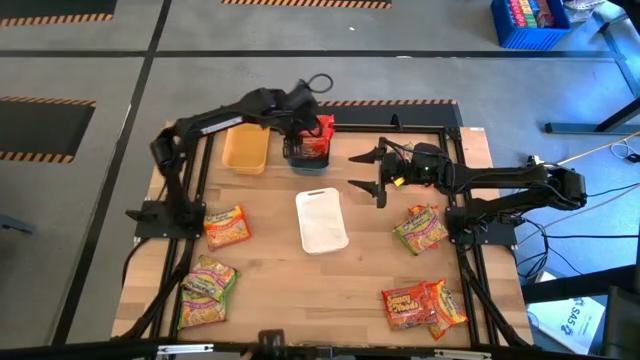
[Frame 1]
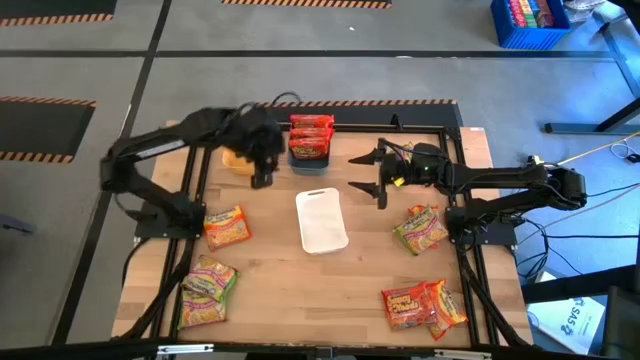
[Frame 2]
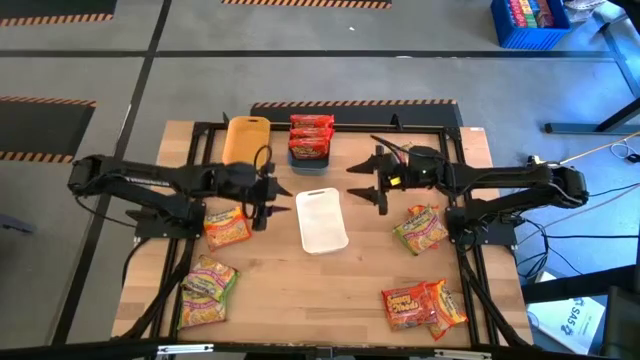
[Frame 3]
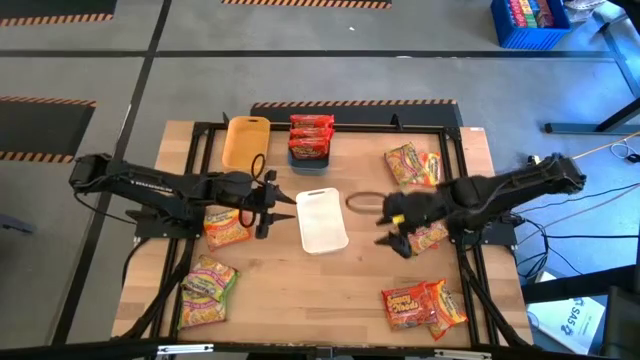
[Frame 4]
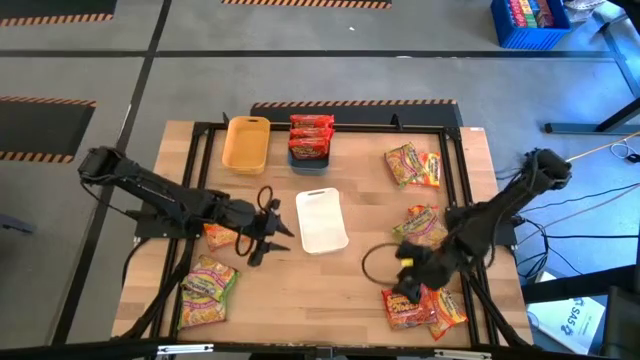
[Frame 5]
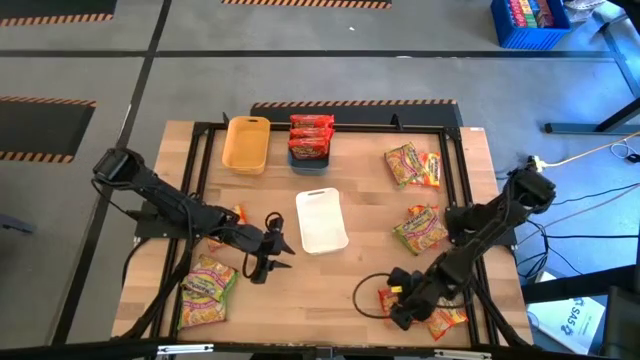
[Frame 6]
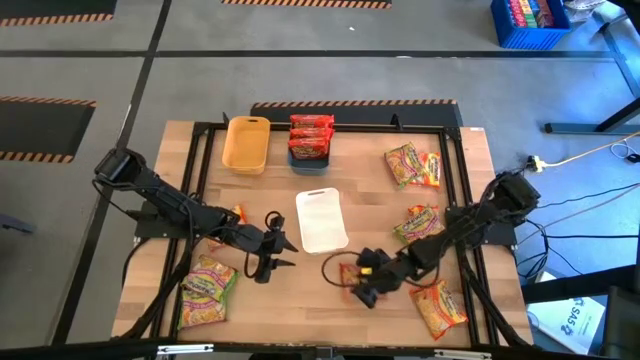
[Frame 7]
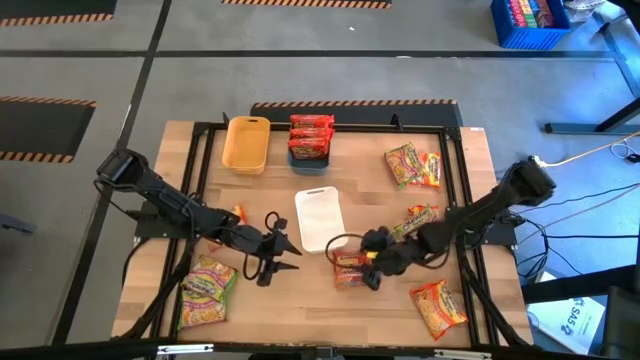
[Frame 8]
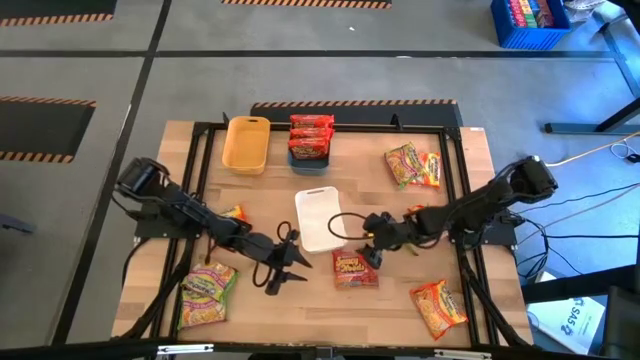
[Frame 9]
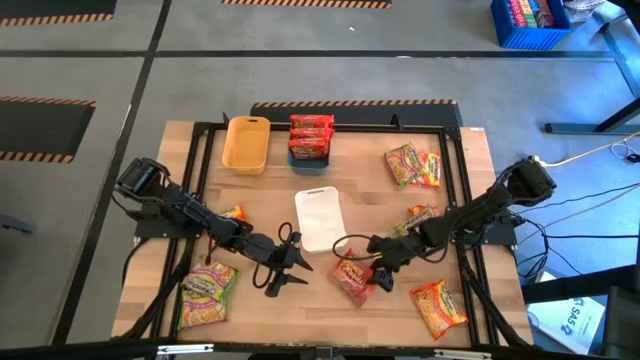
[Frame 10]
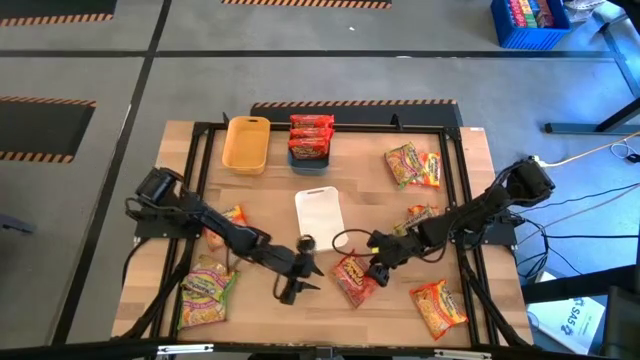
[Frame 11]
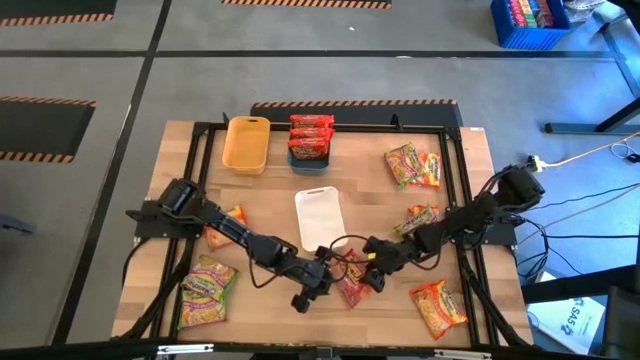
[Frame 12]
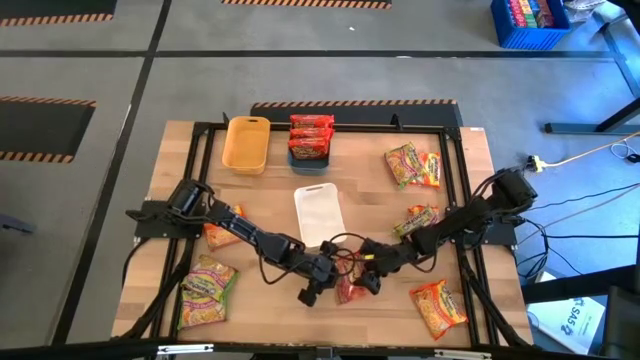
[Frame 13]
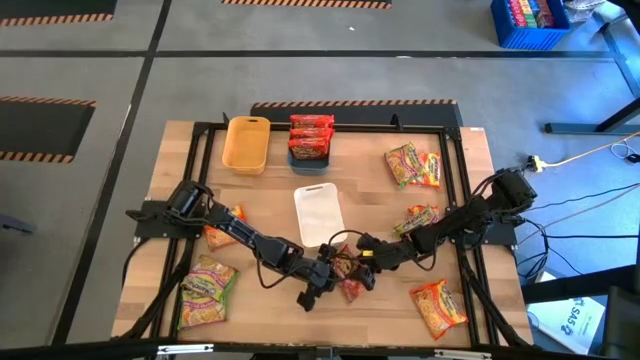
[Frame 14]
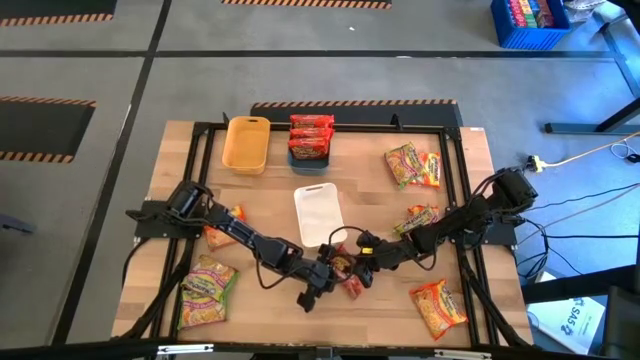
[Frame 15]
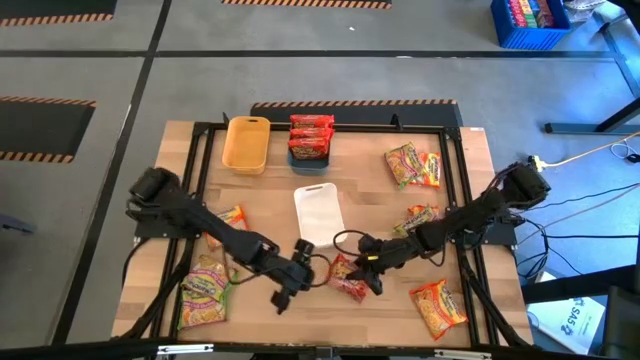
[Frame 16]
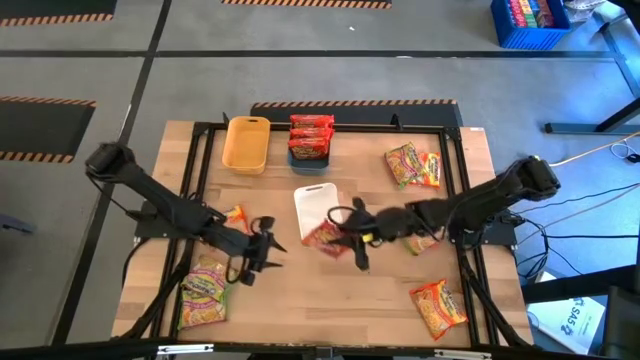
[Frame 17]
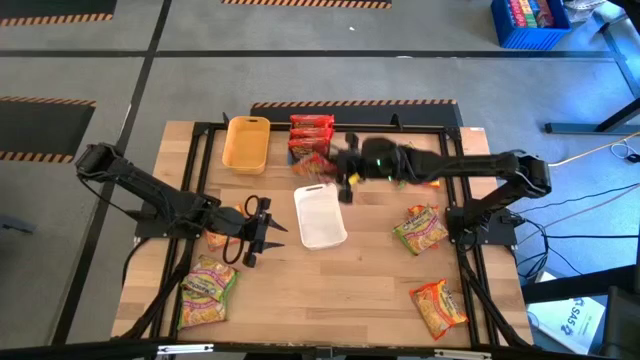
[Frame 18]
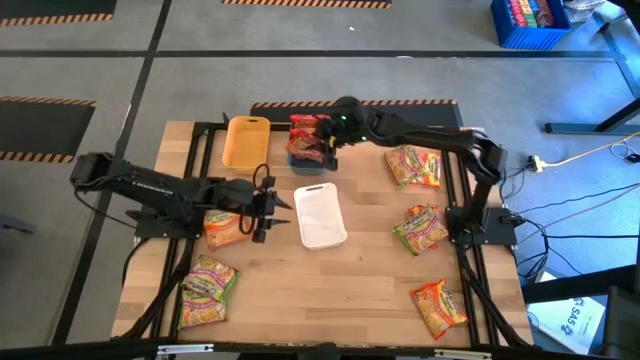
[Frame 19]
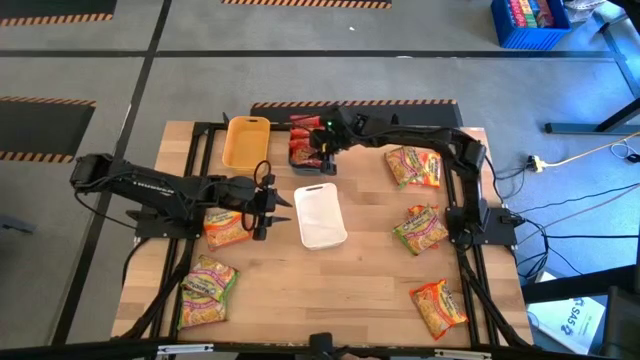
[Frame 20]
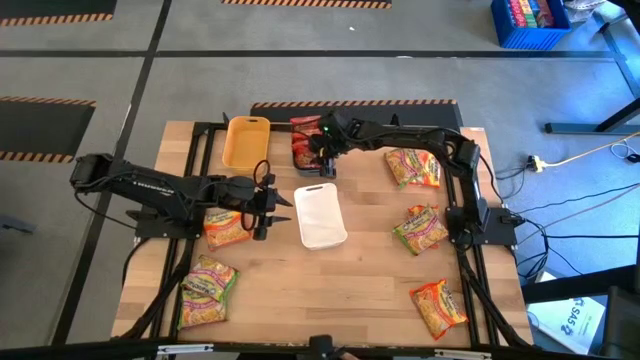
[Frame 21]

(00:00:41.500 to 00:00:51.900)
Task: Sort Maruchan noodles
Put the red noodle pack into the blue bin

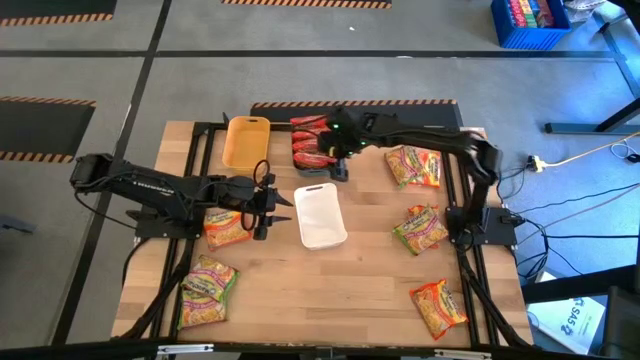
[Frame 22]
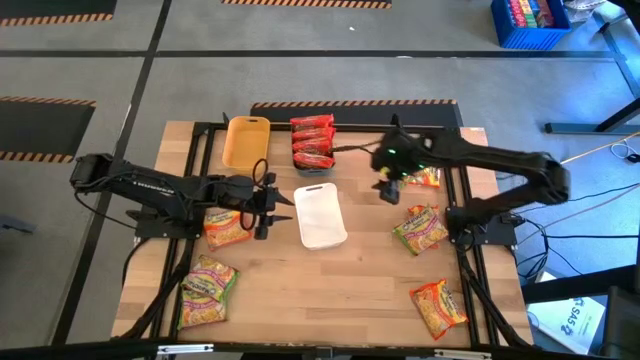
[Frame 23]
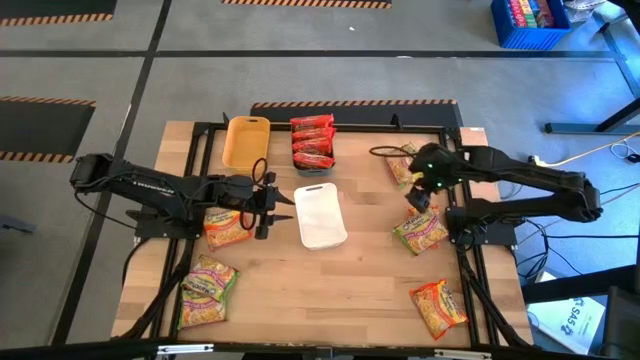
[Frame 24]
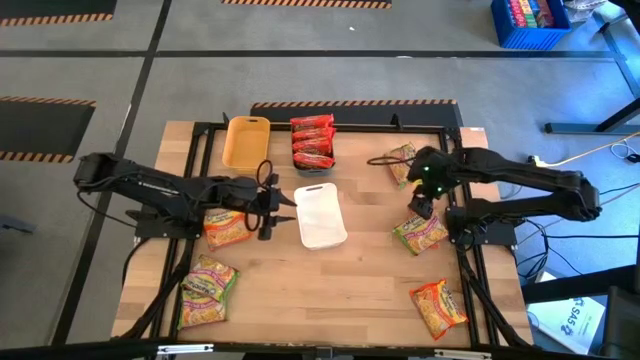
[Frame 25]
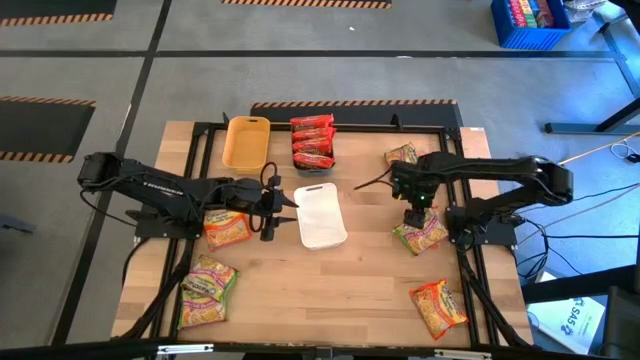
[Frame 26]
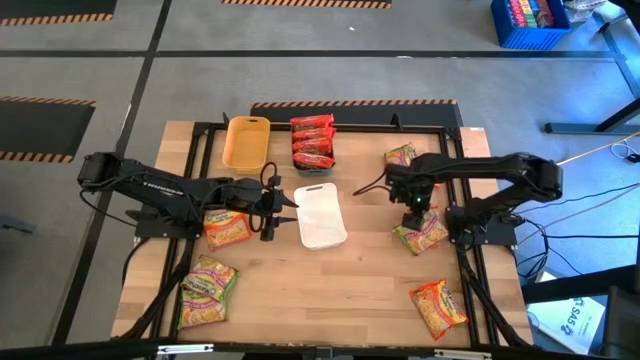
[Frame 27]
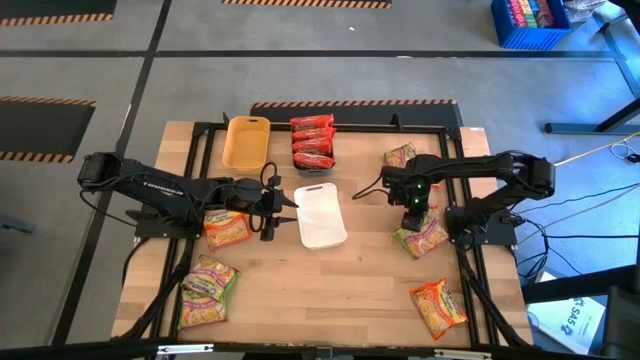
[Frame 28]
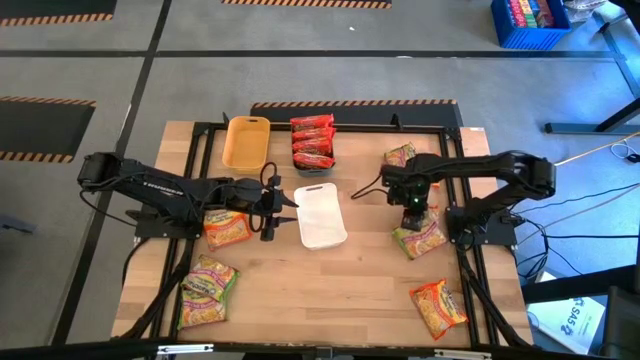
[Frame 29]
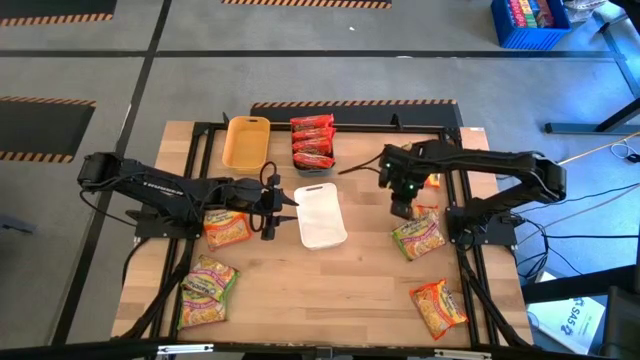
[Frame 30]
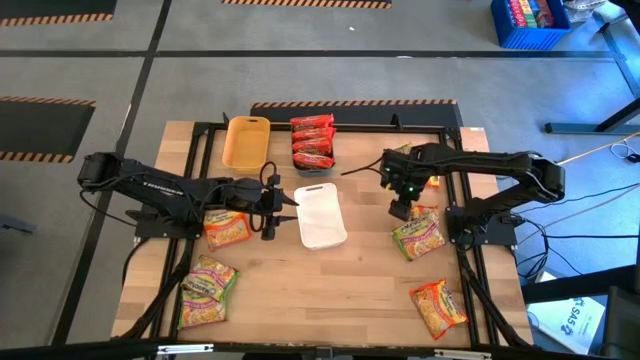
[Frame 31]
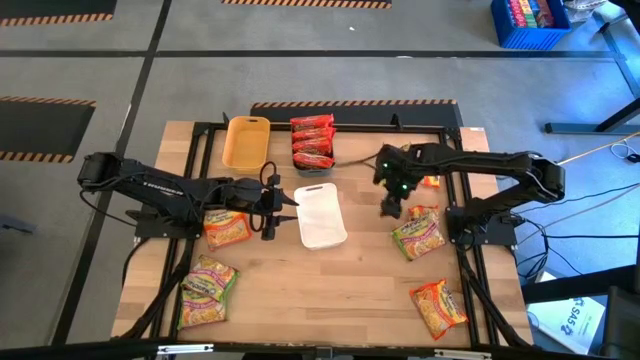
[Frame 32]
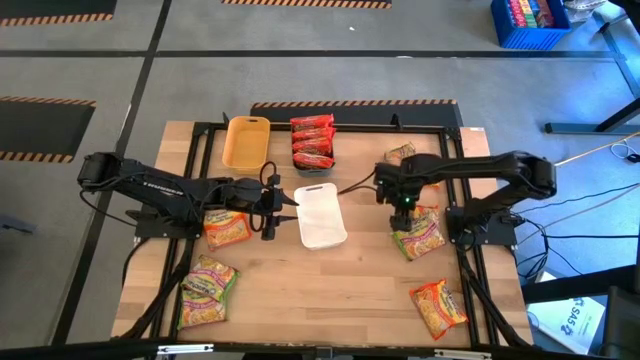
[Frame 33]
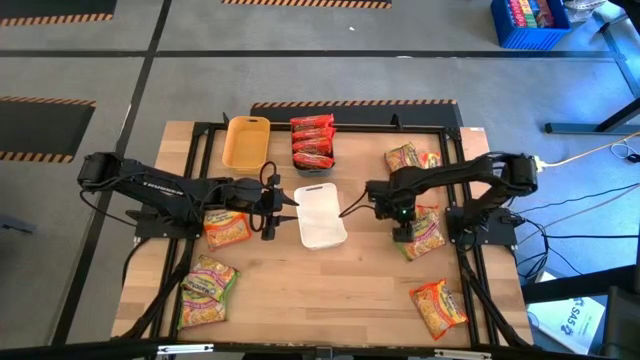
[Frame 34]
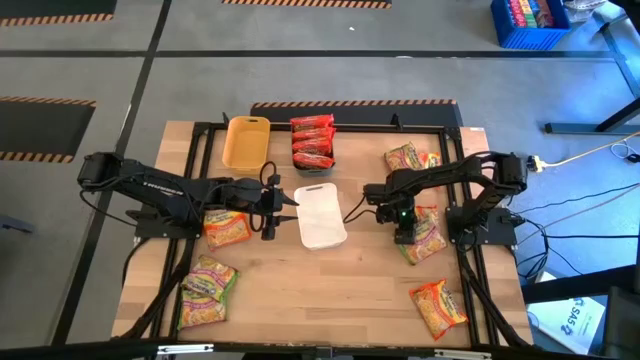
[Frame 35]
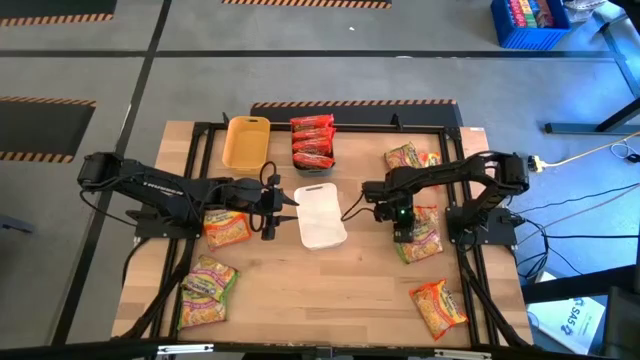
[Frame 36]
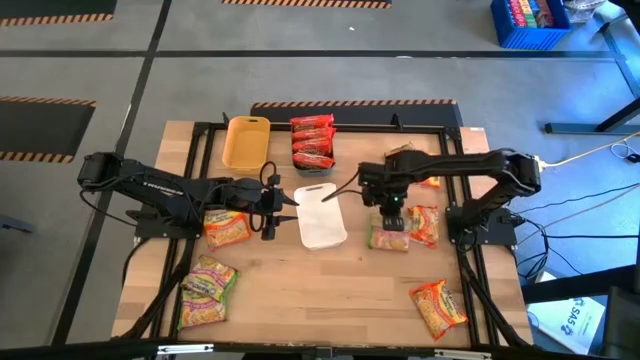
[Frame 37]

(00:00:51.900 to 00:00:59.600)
Put the green noodle pack into the white bin

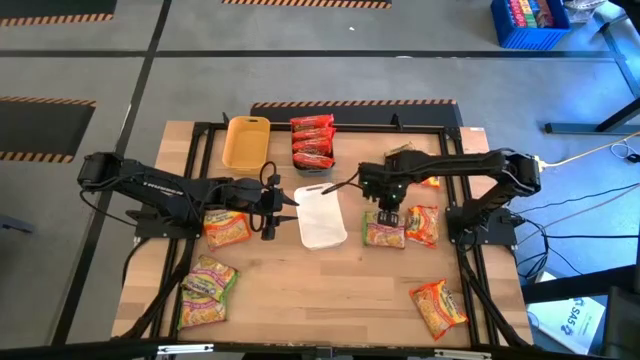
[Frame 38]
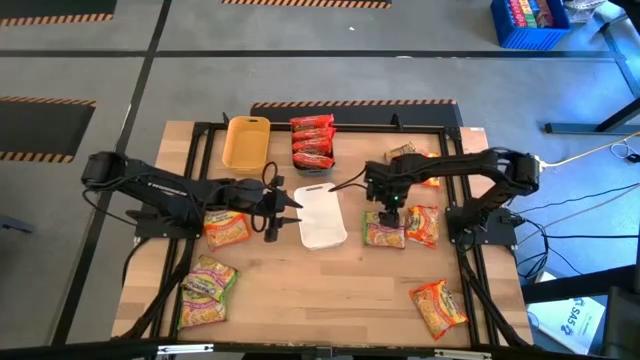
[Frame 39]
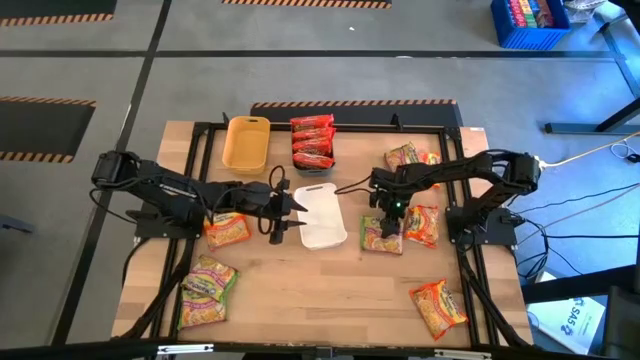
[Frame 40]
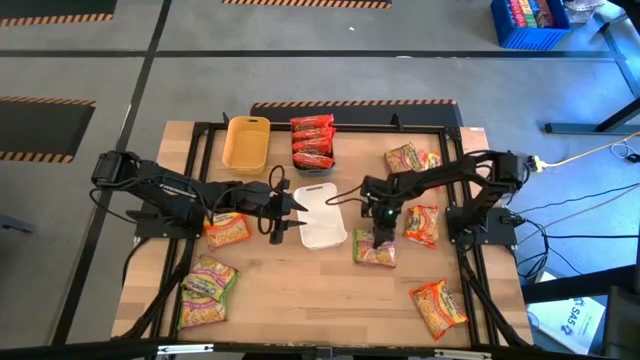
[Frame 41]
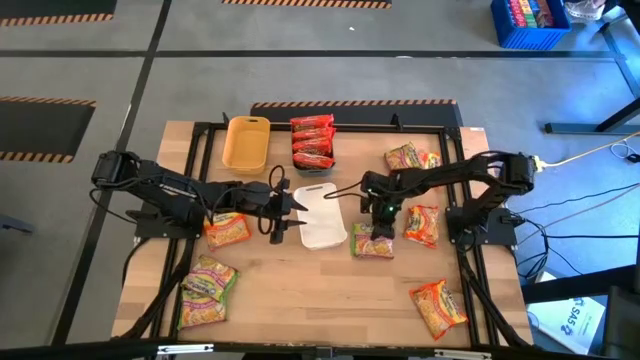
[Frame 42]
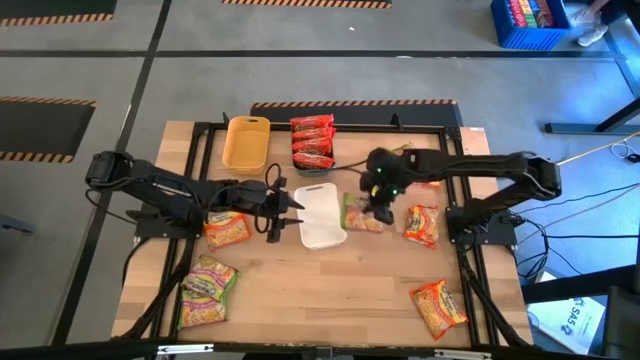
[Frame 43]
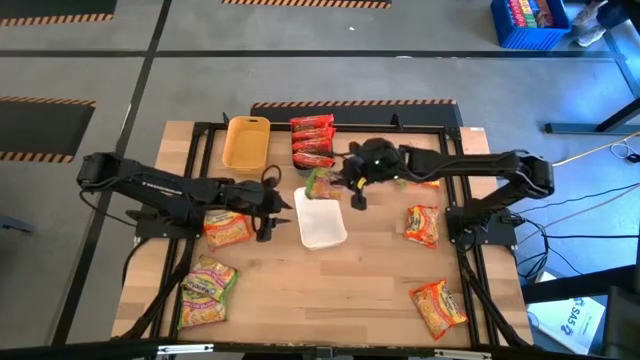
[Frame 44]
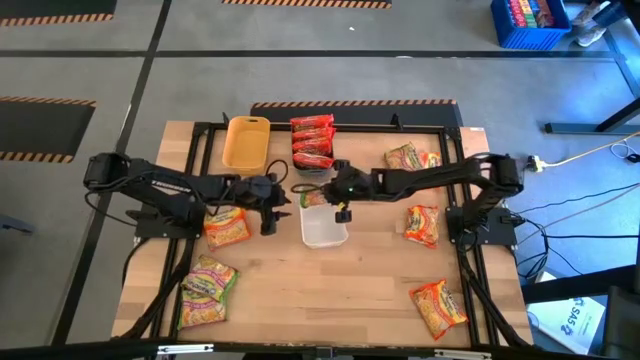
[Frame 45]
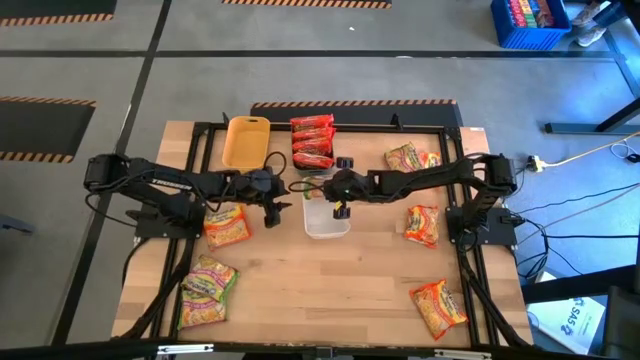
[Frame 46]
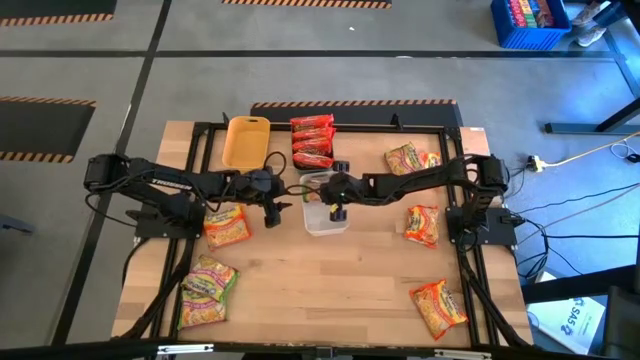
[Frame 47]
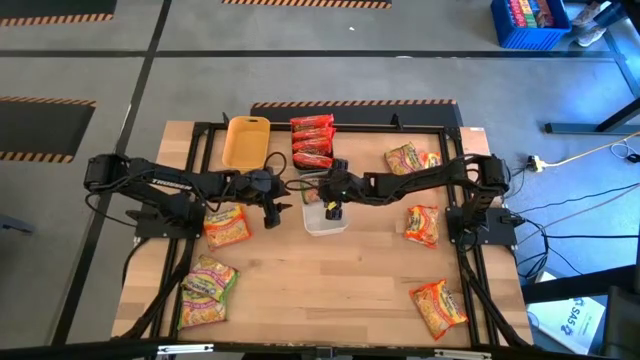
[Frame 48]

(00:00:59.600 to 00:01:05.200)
Put the green noodle pack into the white bin
